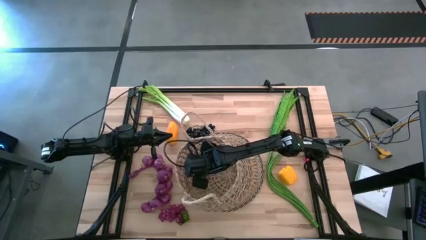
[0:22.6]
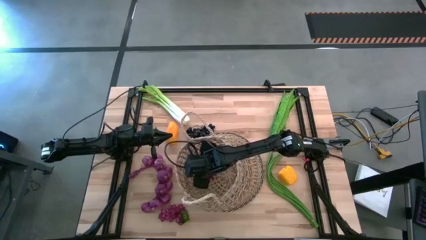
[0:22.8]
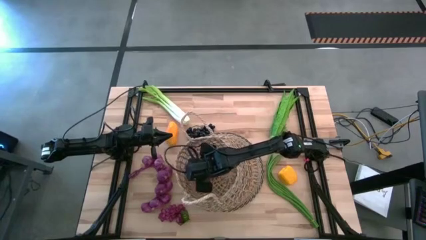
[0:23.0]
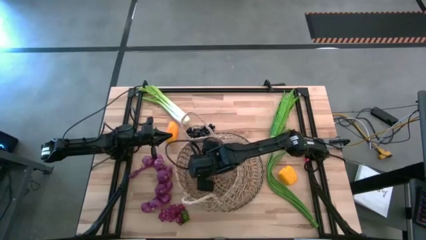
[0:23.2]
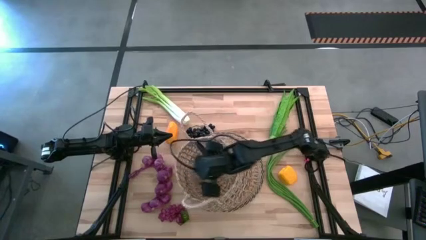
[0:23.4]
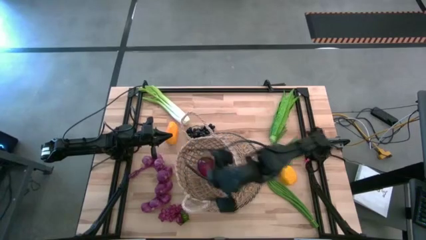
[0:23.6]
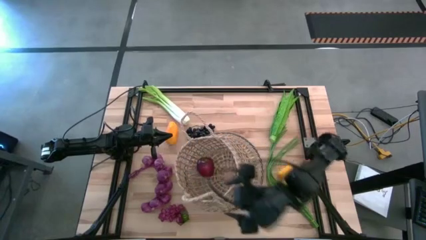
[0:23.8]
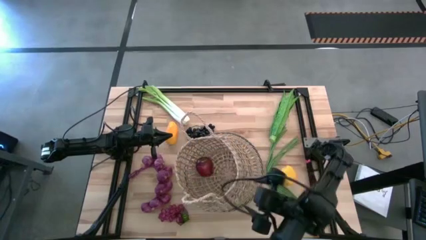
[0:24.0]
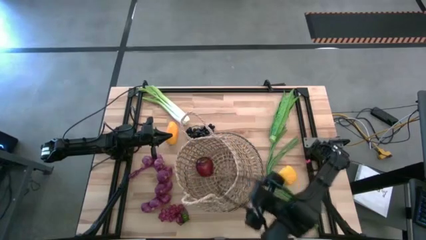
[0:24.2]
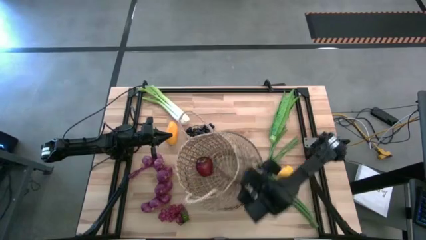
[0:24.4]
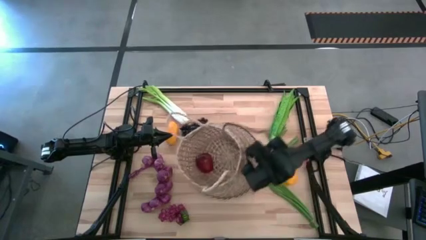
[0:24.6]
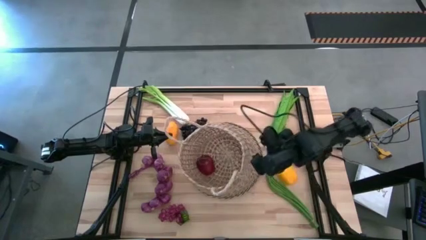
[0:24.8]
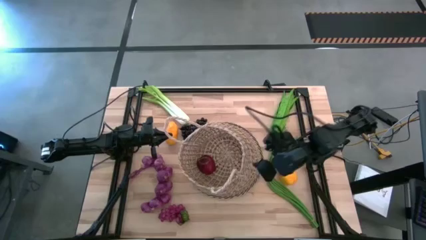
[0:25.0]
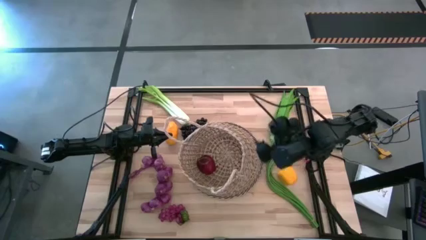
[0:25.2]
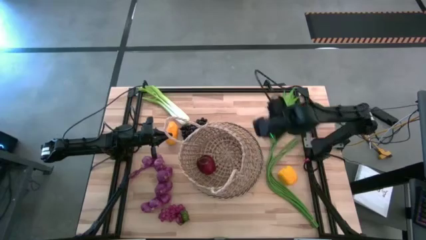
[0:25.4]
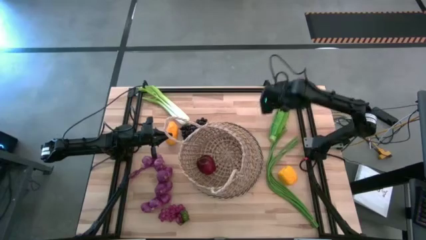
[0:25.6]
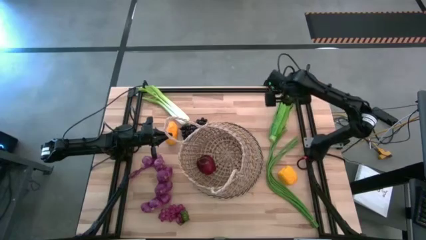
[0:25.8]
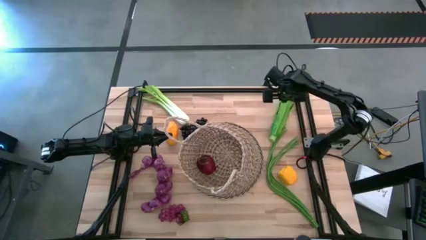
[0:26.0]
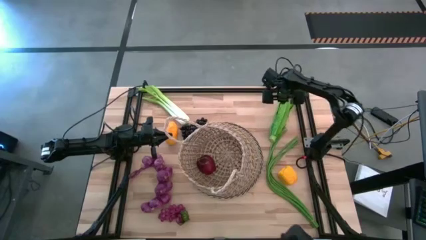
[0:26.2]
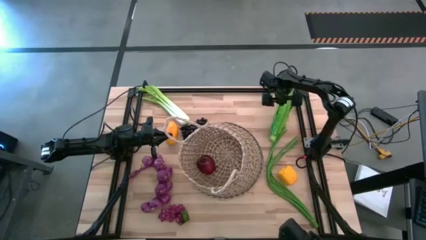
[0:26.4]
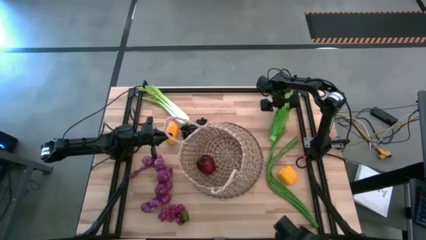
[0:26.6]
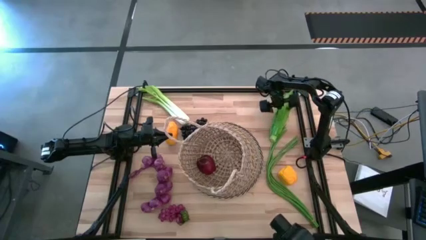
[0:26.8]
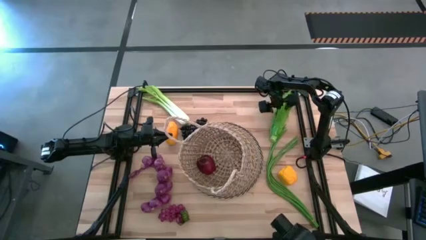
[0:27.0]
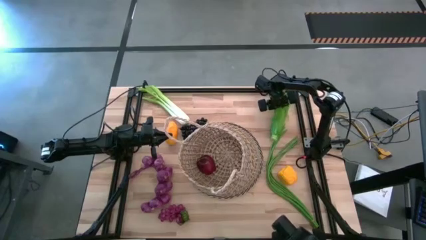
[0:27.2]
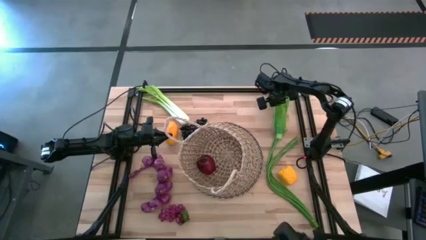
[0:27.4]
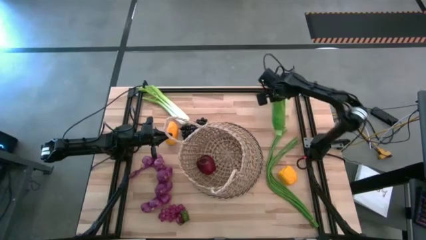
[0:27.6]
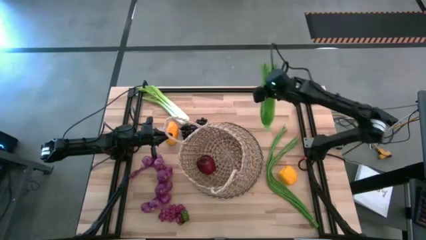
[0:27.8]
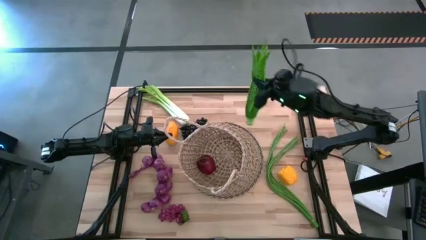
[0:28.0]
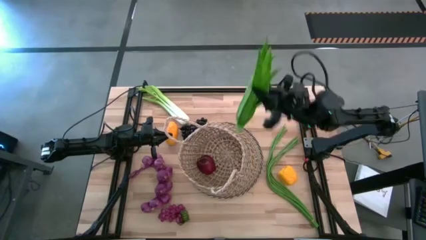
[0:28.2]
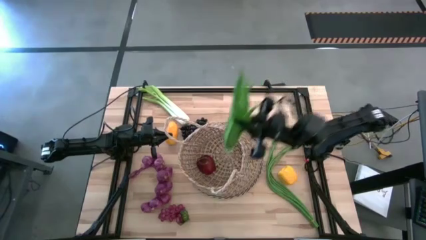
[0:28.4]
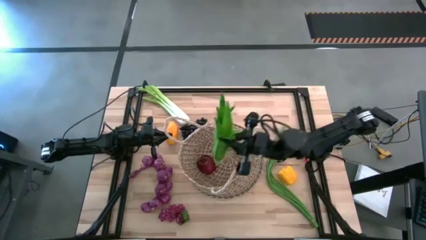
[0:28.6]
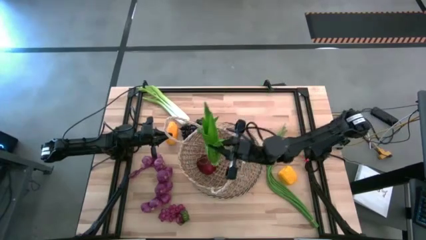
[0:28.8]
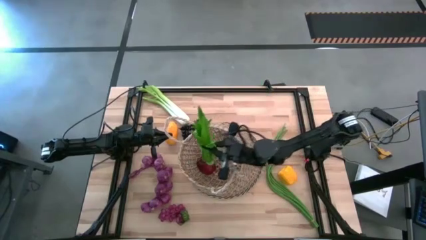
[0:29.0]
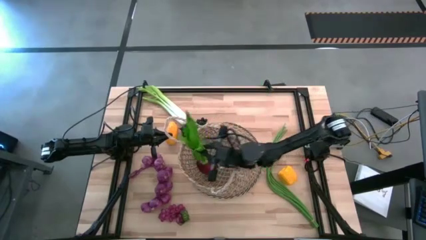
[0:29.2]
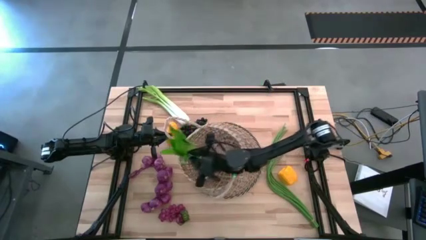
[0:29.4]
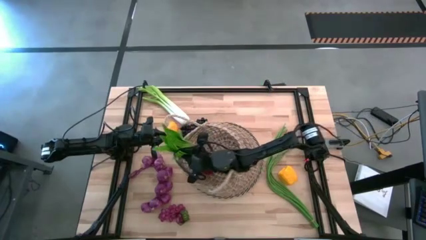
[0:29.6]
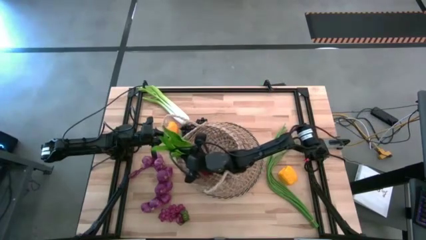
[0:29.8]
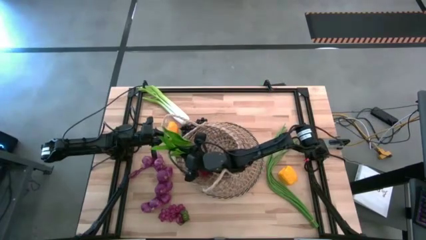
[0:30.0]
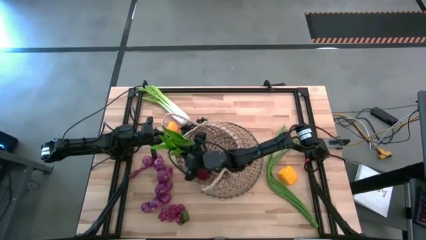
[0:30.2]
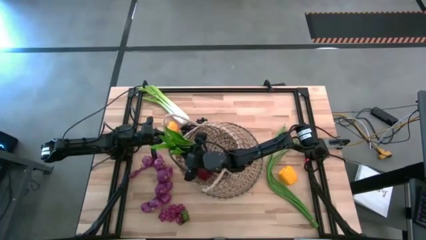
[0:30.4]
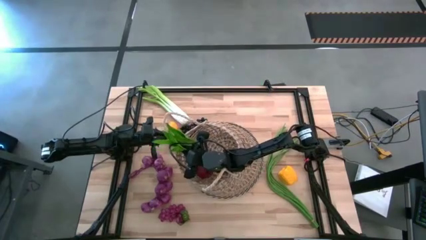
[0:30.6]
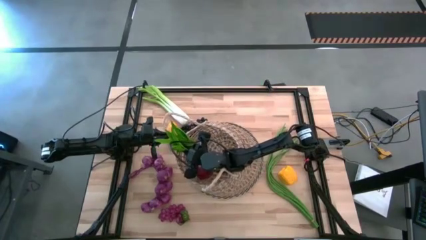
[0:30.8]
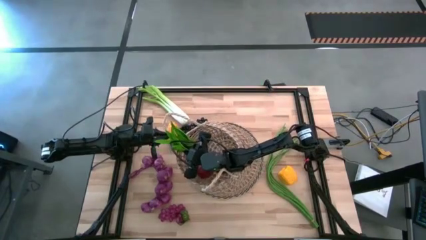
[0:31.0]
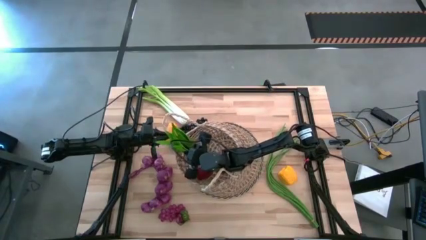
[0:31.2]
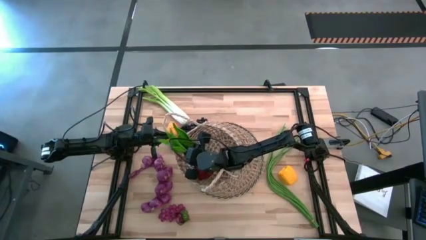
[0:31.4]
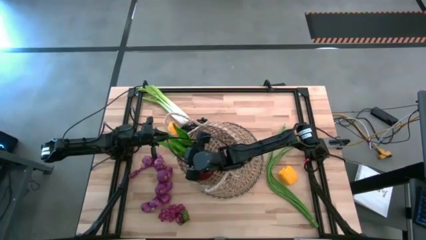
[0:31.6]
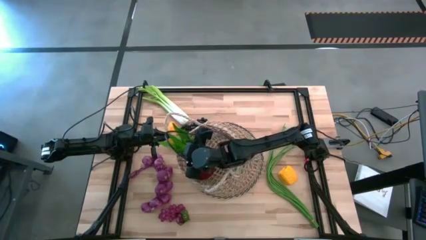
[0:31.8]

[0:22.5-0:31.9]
Task: Build produce basket
Put the leaf lettuce into the basket

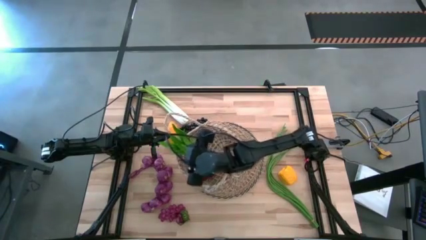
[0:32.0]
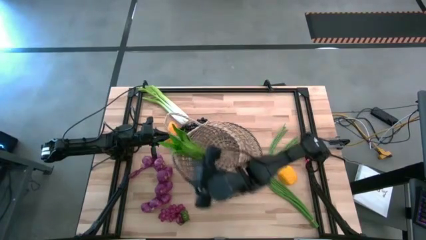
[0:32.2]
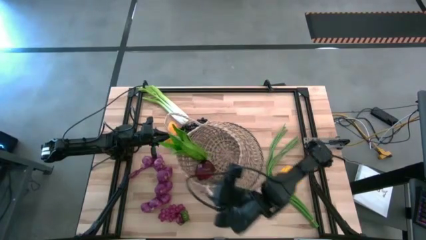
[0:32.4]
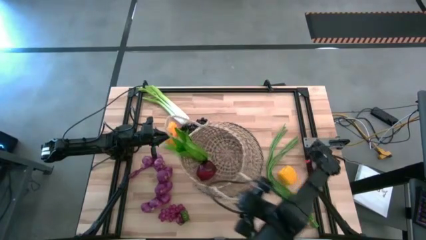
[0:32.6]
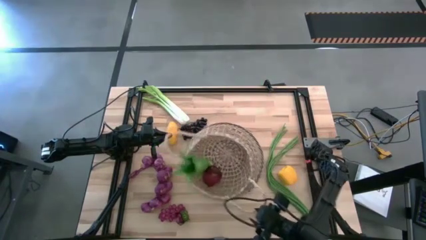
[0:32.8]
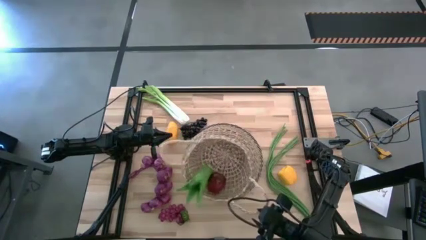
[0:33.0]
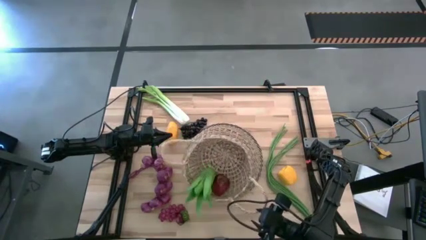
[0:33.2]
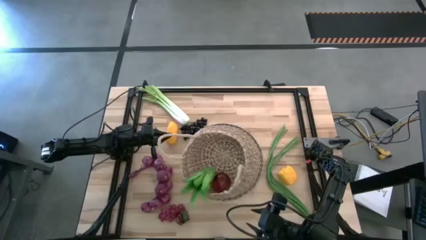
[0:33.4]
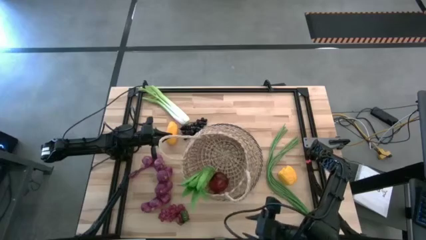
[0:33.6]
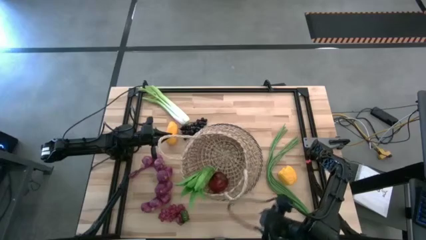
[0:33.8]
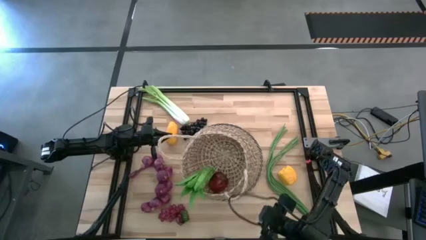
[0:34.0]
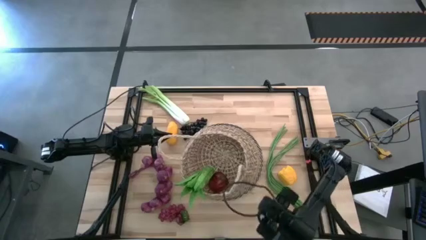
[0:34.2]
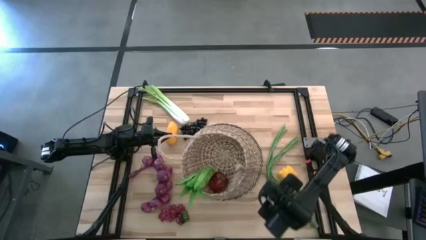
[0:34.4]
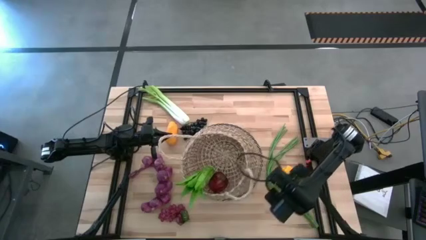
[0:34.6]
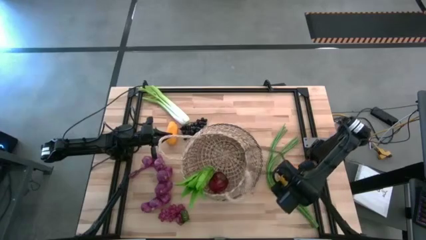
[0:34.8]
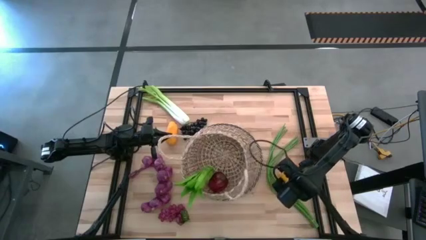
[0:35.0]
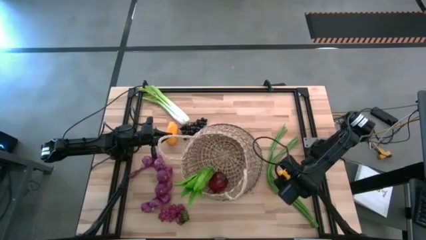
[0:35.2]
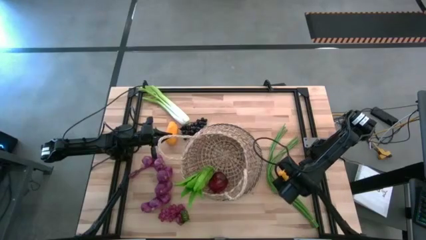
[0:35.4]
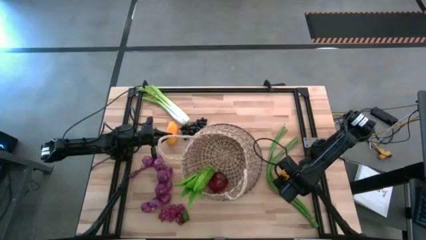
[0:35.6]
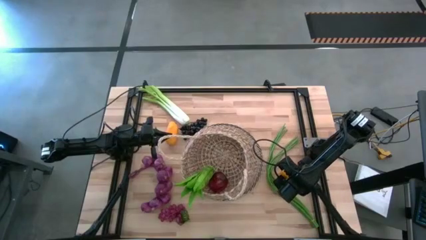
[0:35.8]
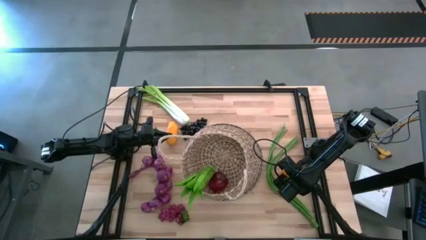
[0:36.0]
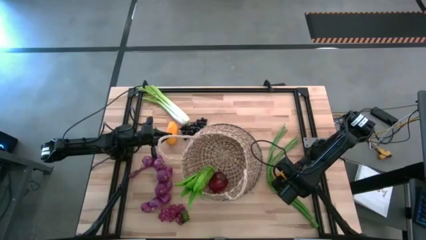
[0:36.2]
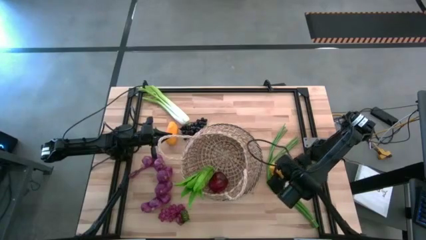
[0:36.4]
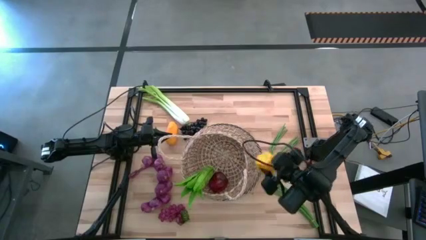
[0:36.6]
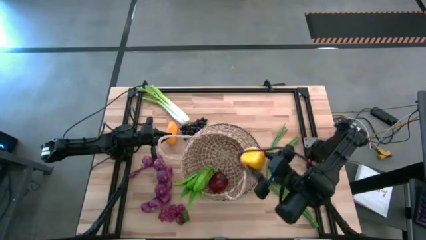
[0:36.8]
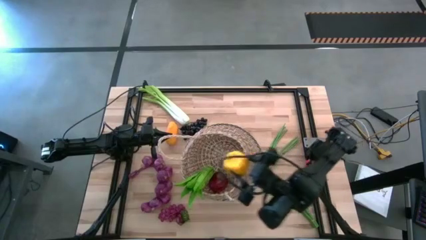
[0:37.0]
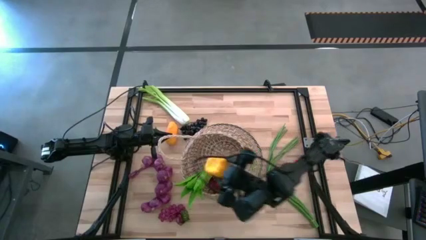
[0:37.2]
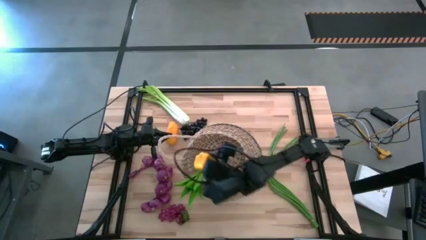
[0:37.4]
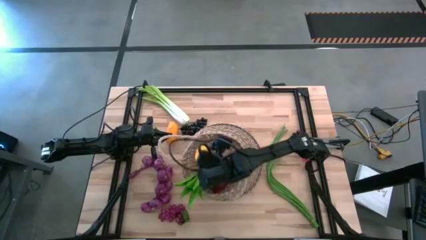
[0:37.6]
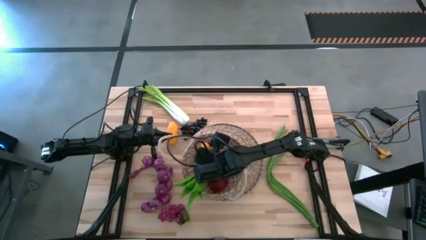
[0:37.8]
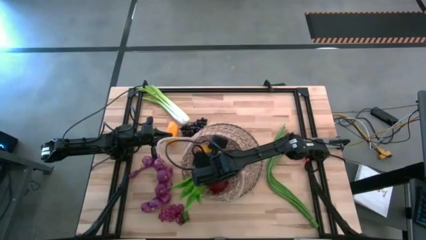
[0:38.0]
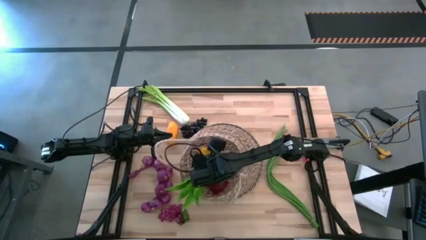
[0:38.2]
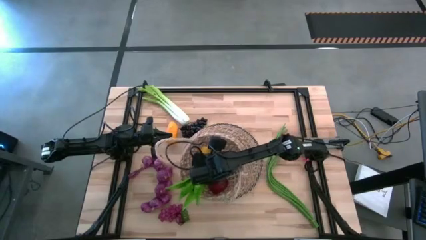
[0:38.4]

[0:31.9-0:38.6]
Put the bell pepper into the basket
